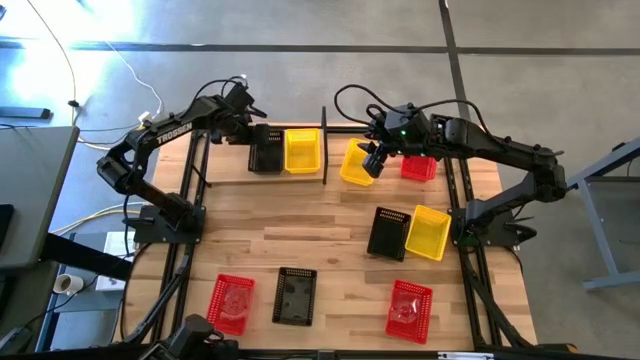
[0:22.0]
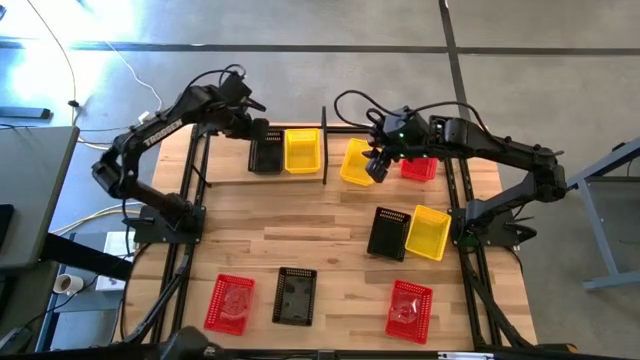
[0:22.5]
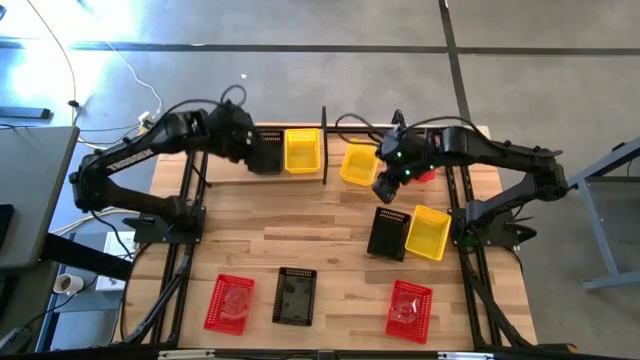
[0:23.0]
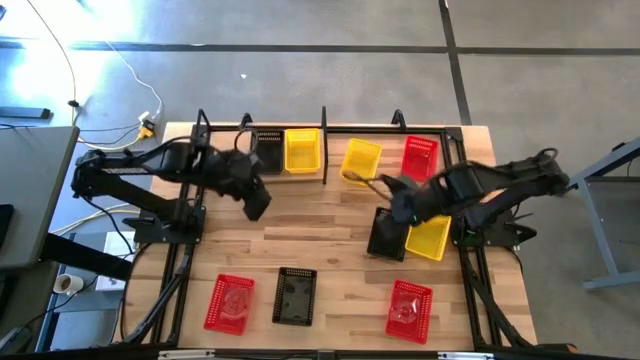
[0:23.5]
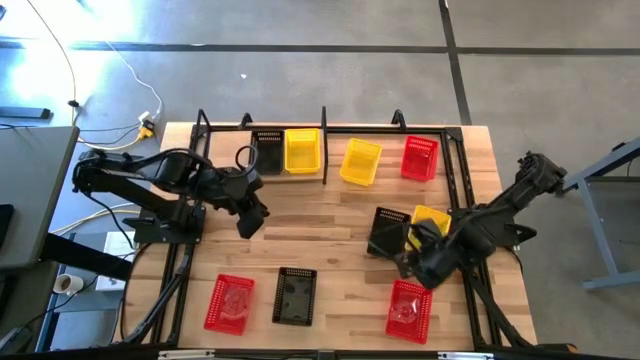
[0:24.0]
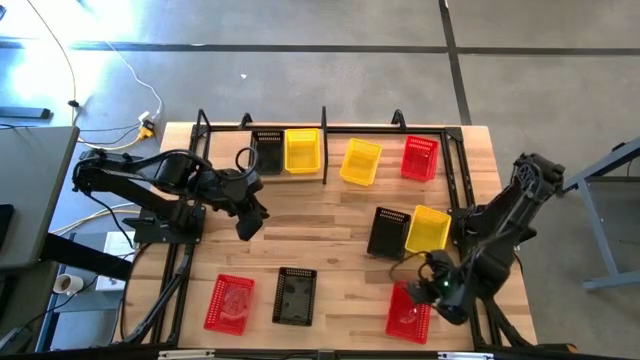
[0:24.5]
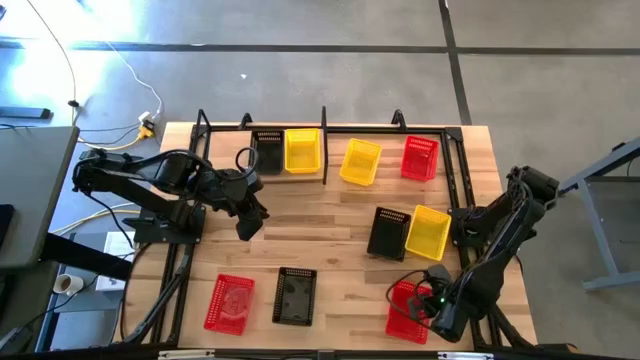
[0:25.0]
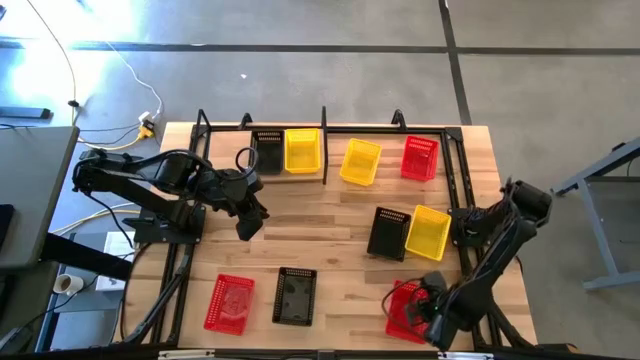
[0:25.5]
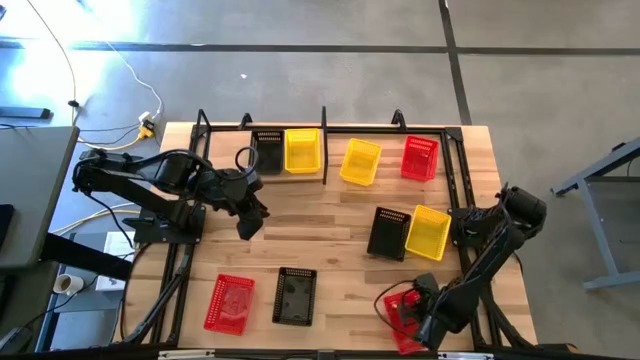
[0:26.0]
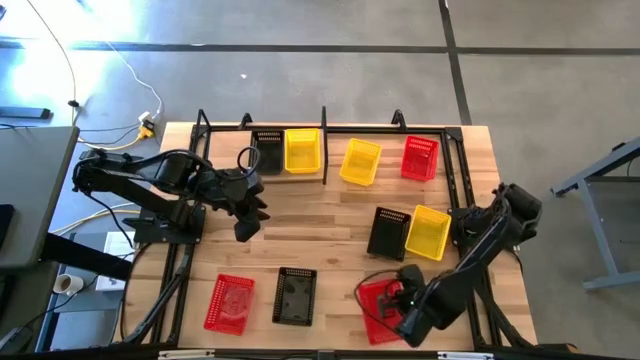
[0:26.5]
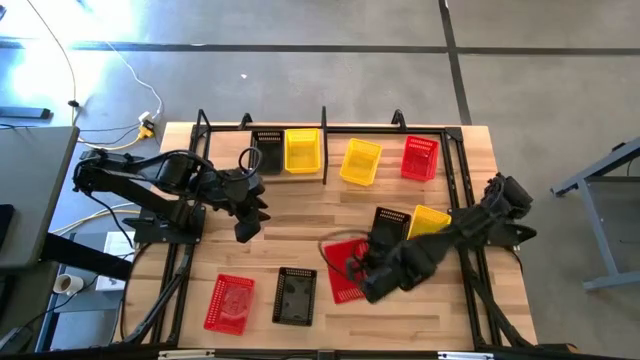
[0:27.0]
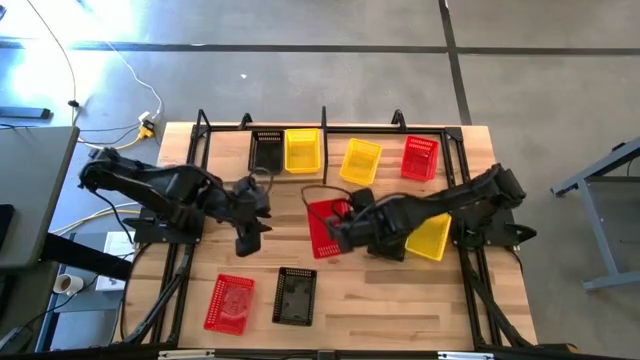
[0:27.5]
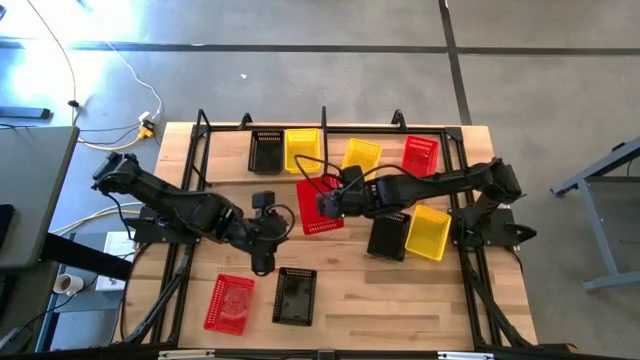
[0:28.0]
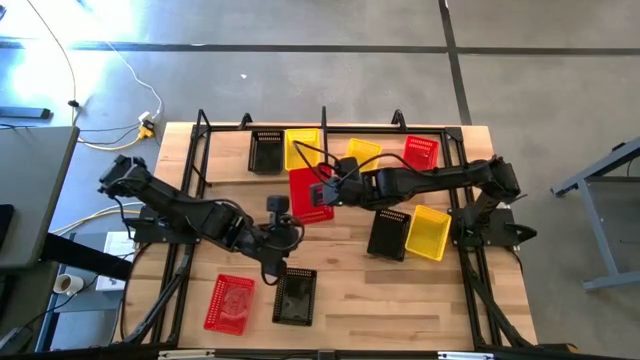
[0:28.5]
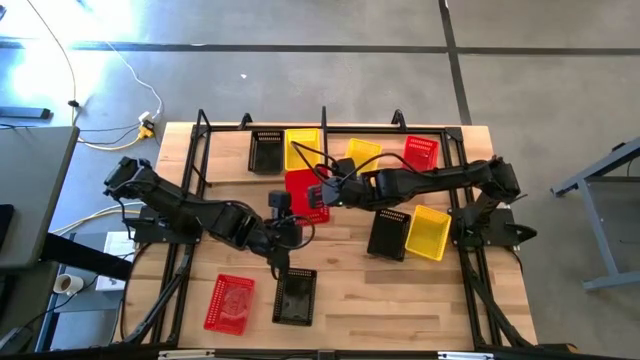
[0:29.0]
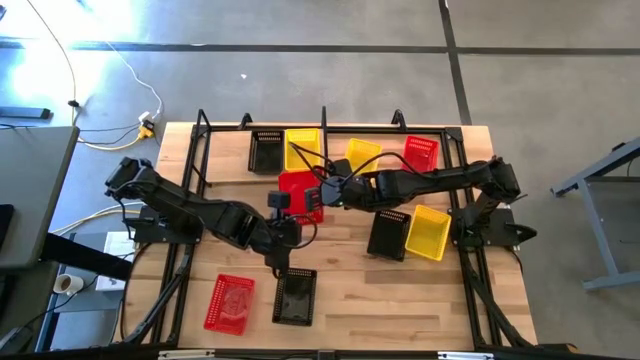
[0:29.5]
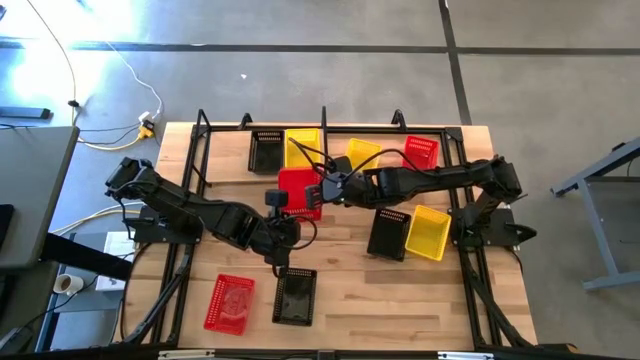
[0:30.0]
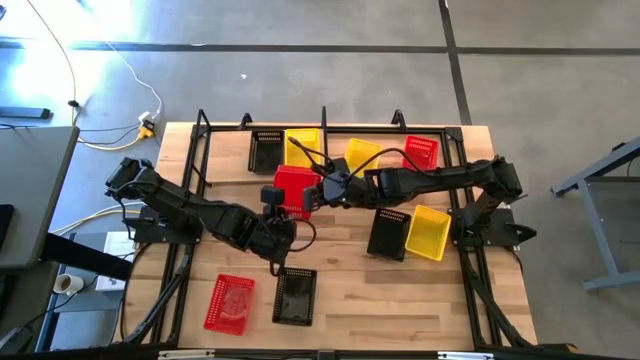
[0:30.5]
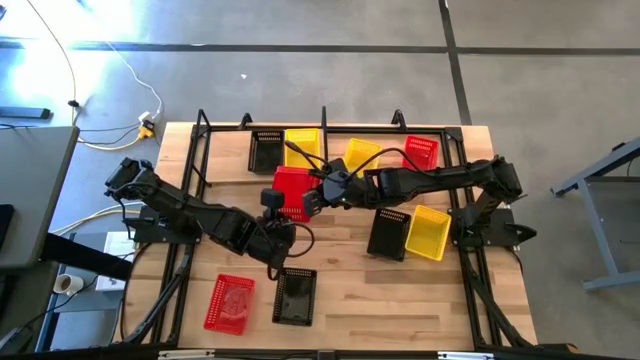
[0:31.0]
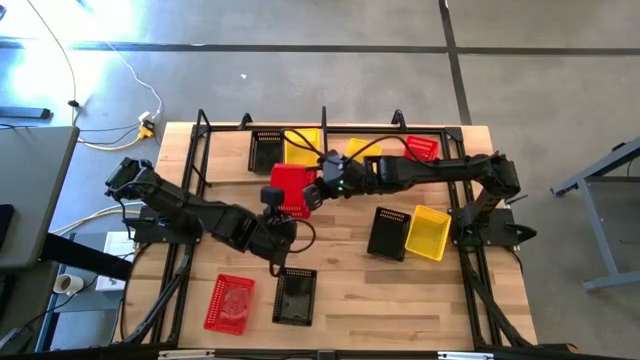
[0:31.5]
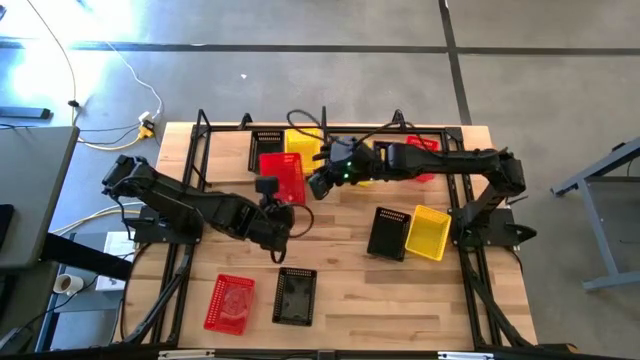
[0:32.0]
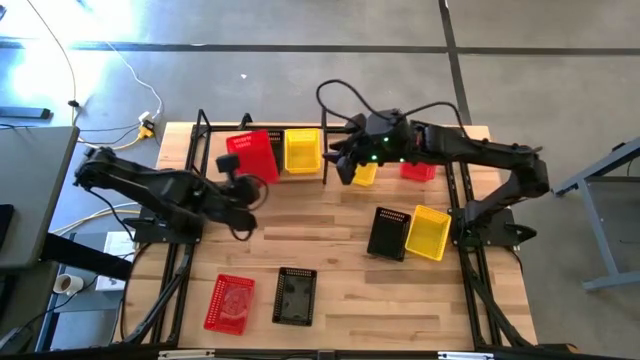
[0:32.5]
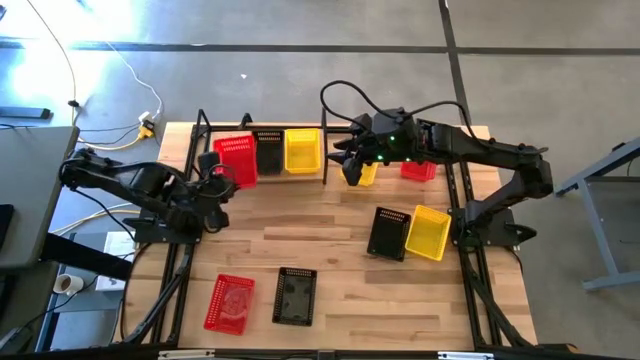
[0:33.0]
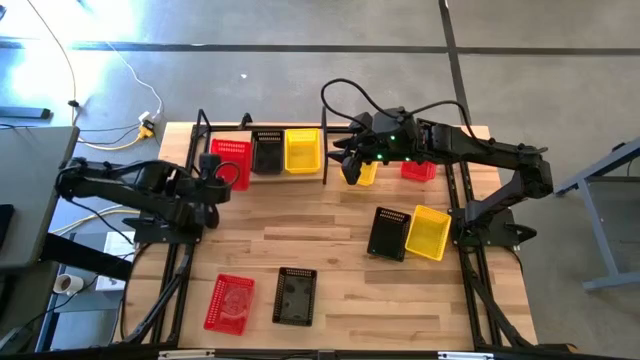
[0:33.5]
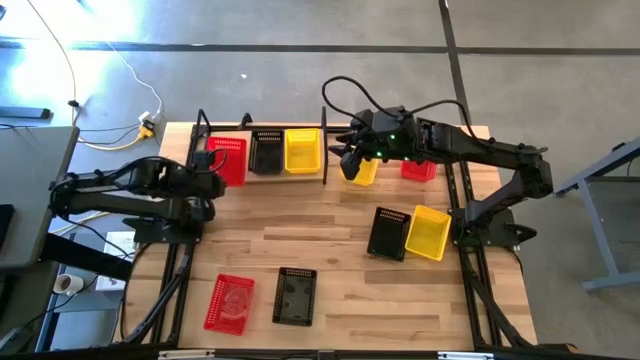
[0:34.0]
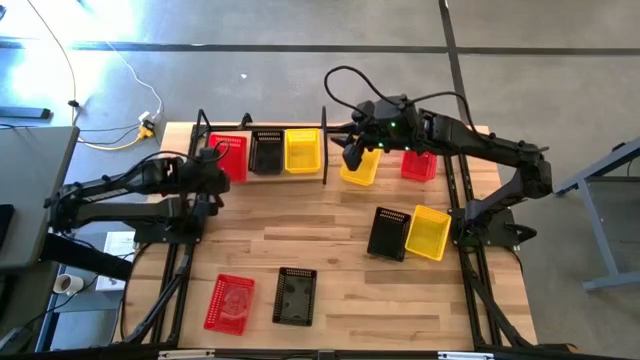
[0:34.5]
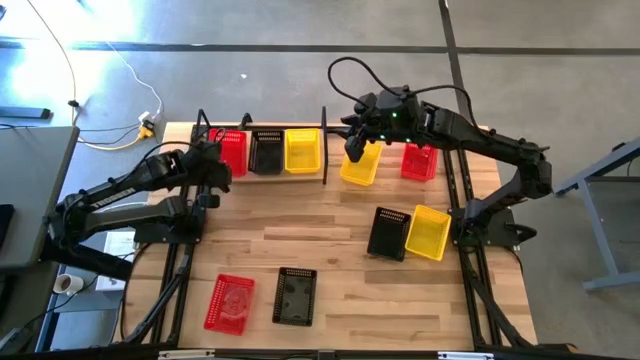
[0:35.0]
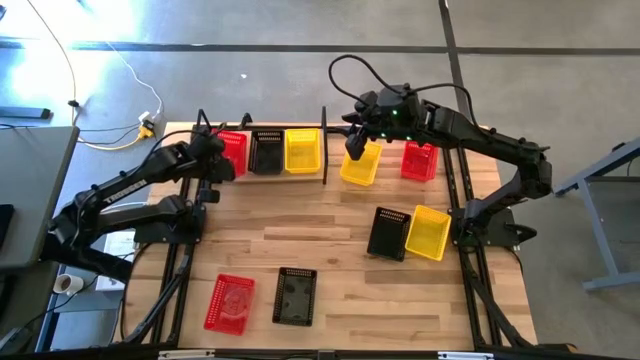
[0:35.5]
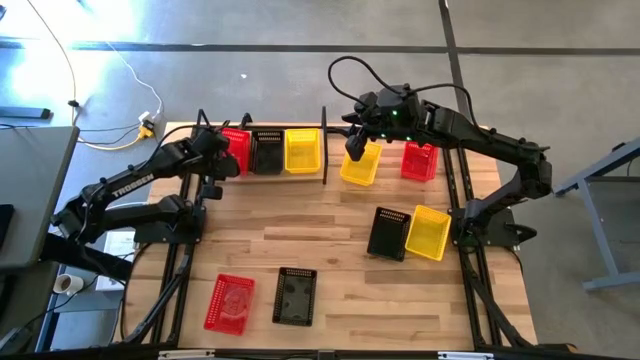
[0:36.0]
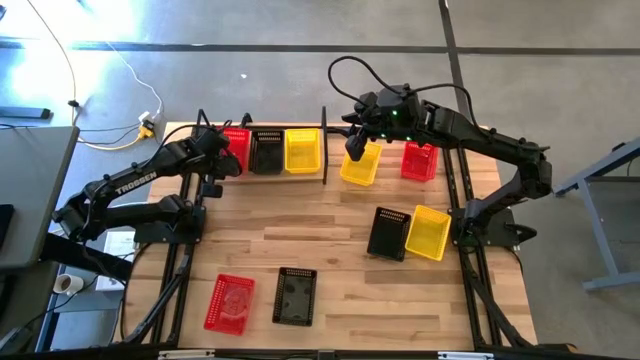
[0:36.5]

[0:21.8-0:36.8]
Task: Stack baskets on shelf by color
Put the bottom right red bin on the shelf

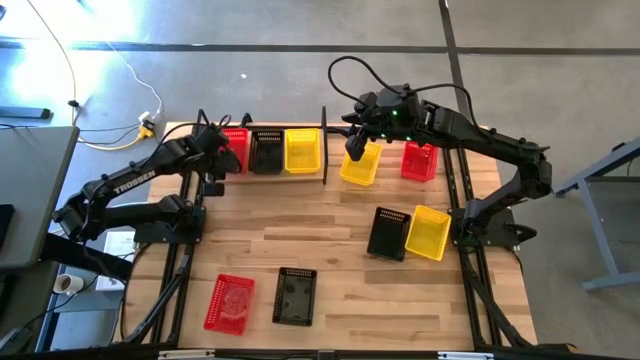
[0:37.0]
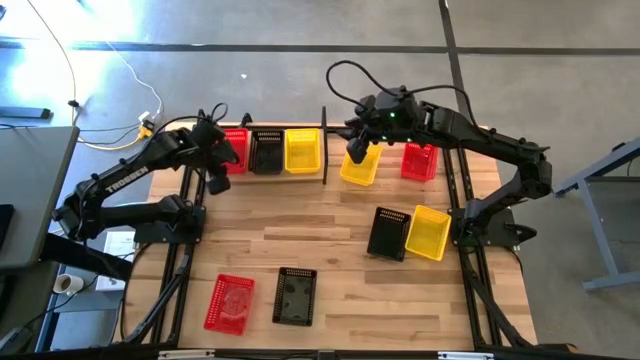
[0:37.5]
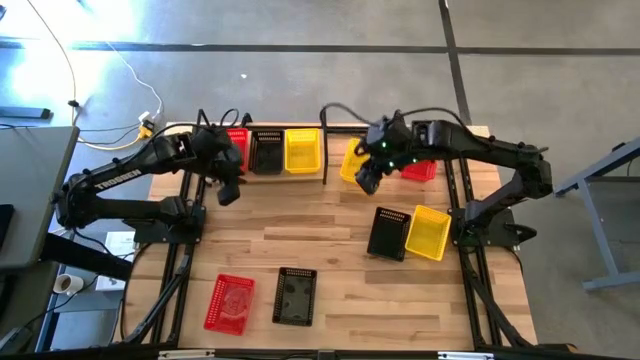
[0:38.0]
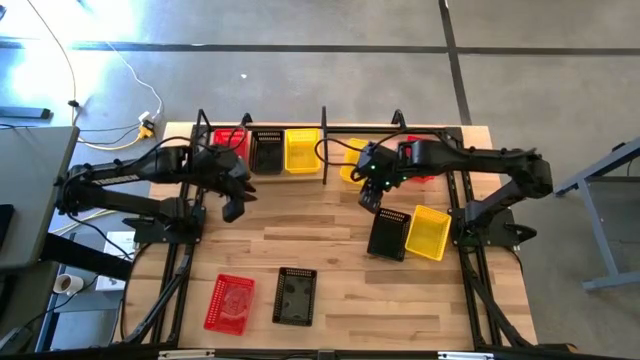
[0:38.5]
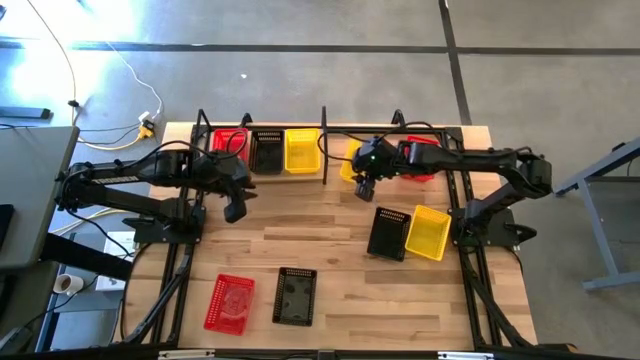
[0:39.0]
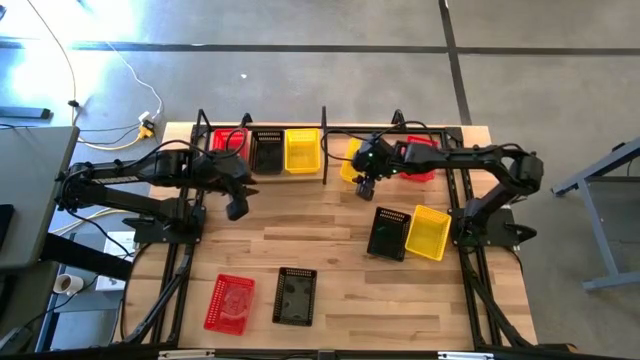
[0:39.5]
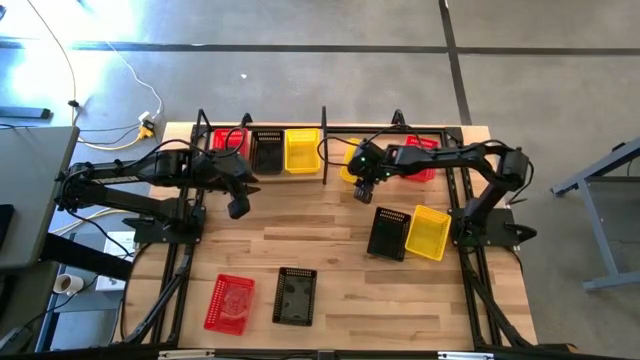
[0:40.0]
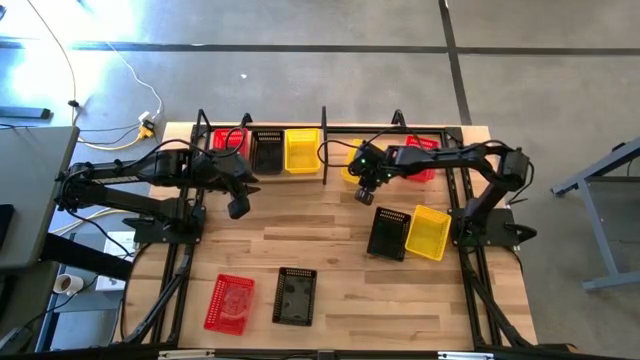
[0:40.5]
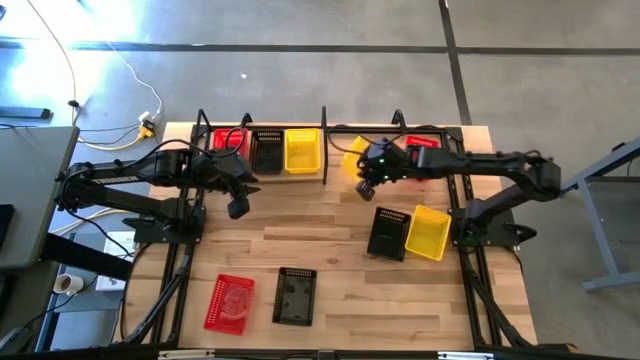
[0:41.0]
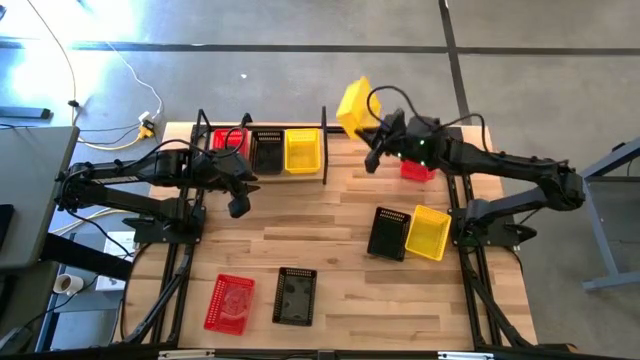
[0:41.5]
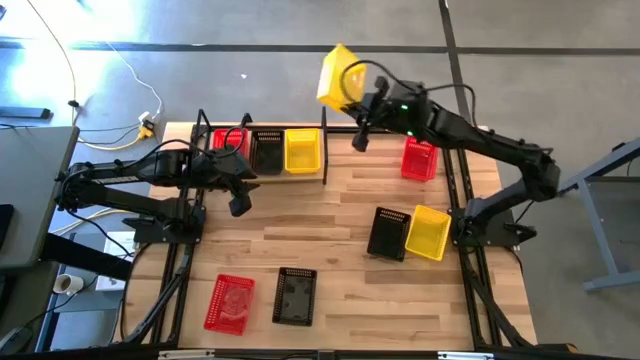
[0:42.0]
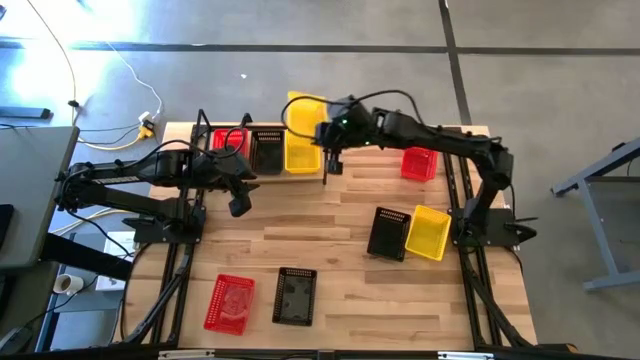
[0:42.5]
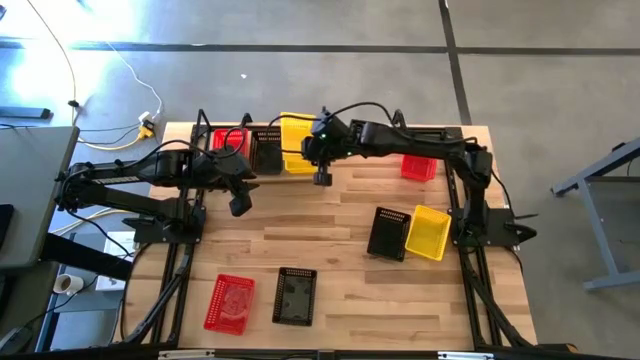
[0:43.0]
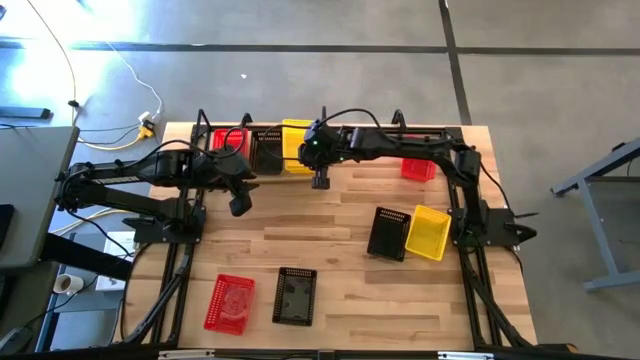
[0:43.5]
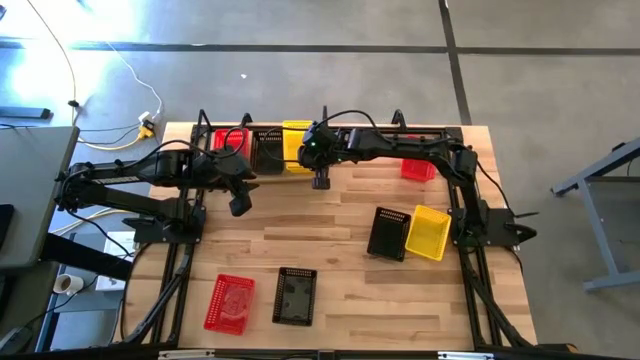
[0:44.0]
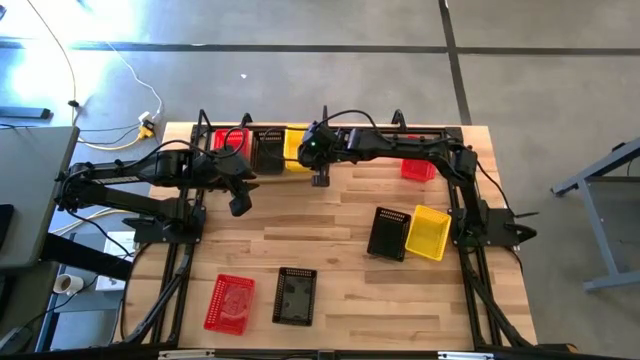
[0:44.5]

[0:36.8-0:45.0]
Stack the top yellow bin on top of the yellow bin
